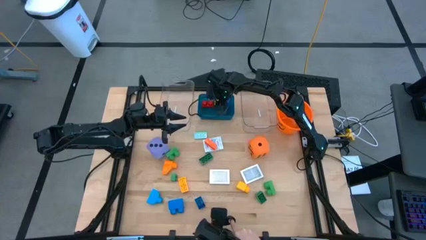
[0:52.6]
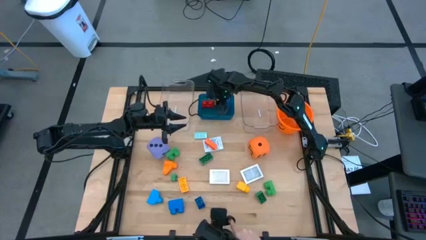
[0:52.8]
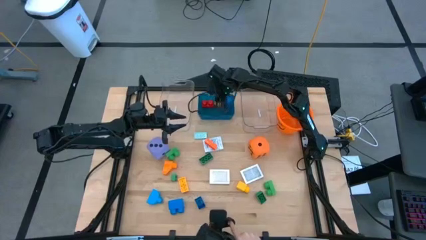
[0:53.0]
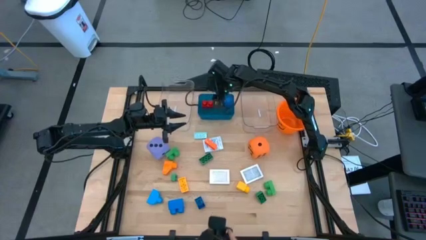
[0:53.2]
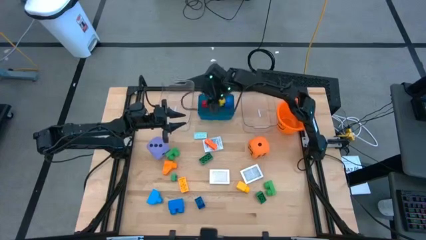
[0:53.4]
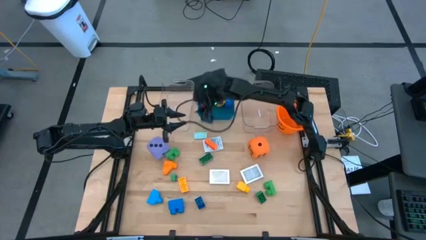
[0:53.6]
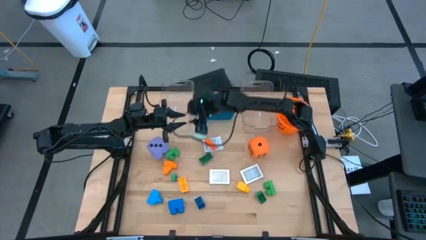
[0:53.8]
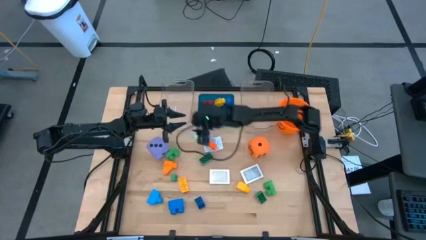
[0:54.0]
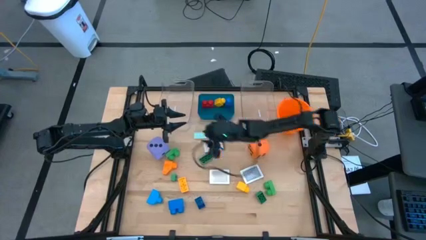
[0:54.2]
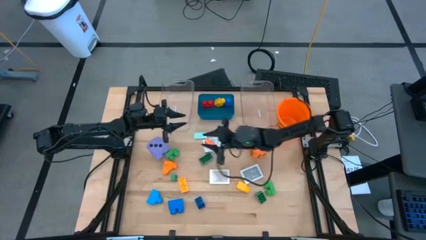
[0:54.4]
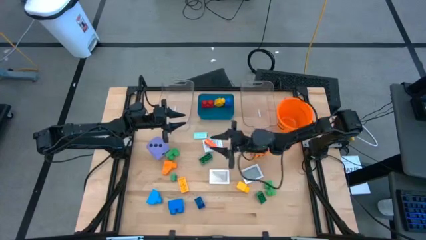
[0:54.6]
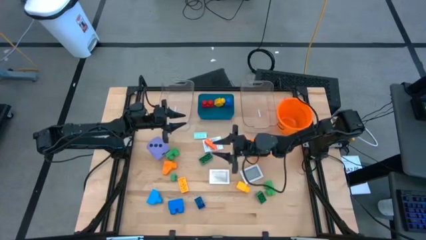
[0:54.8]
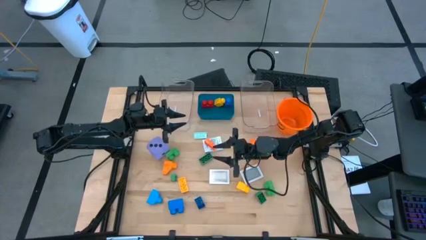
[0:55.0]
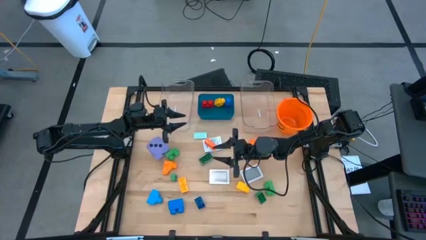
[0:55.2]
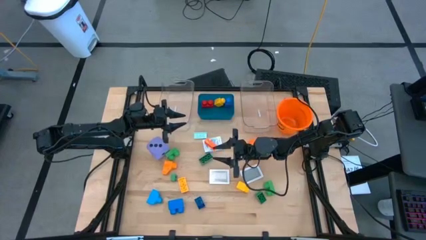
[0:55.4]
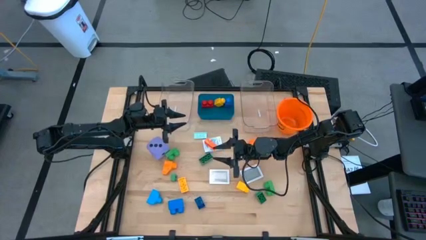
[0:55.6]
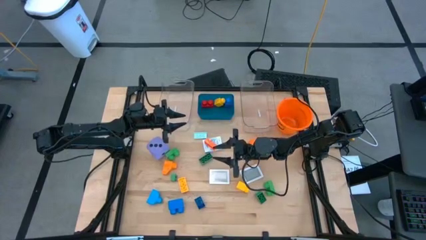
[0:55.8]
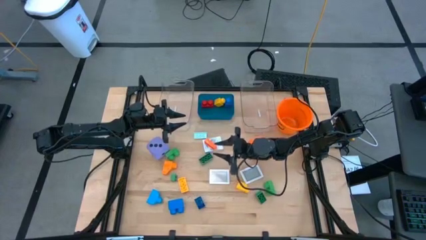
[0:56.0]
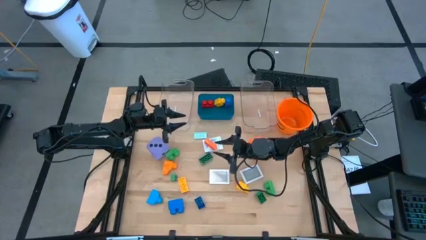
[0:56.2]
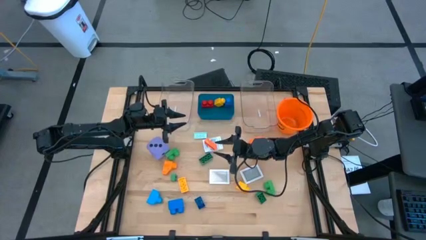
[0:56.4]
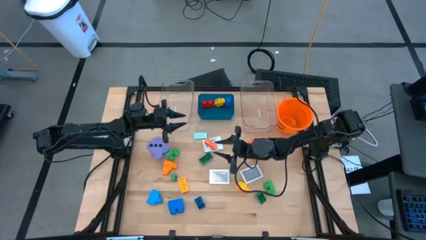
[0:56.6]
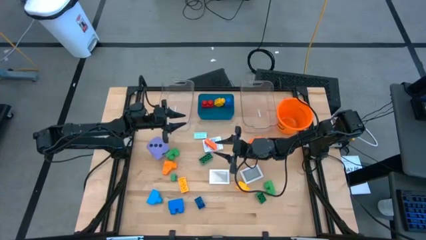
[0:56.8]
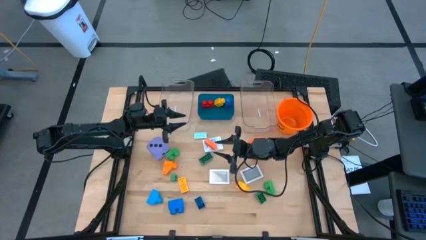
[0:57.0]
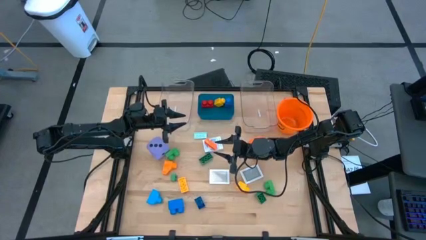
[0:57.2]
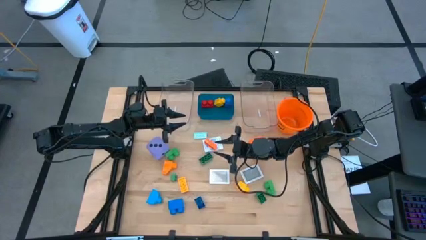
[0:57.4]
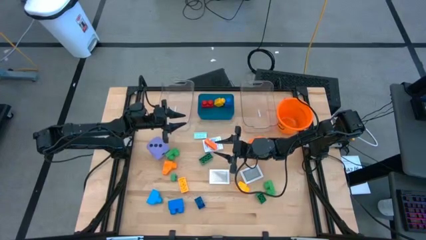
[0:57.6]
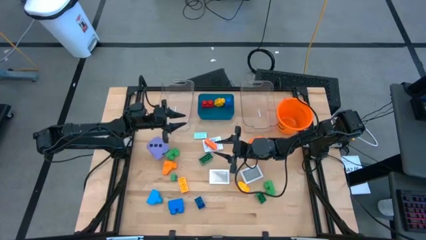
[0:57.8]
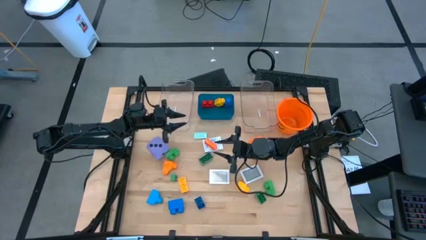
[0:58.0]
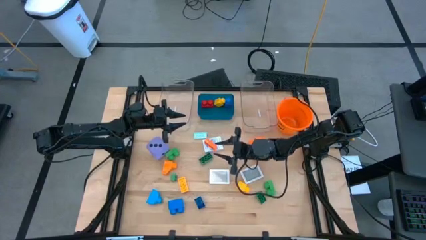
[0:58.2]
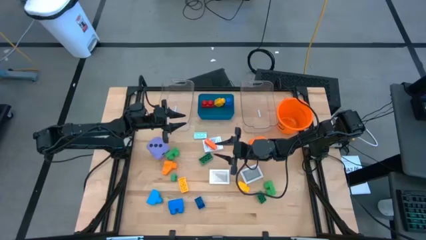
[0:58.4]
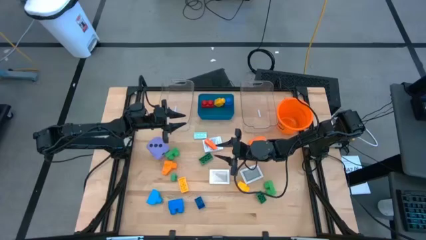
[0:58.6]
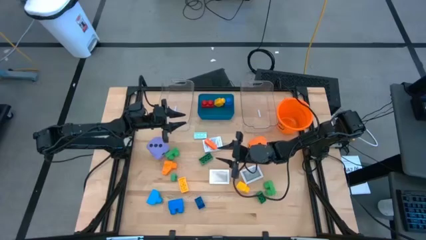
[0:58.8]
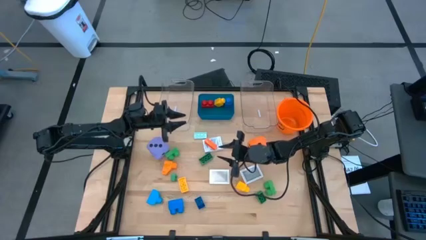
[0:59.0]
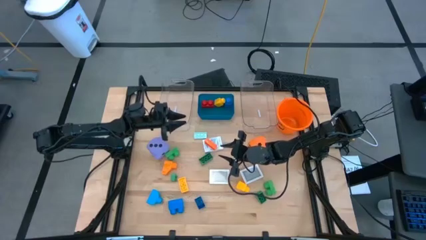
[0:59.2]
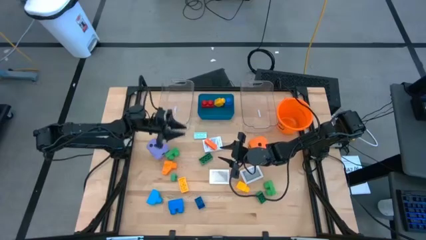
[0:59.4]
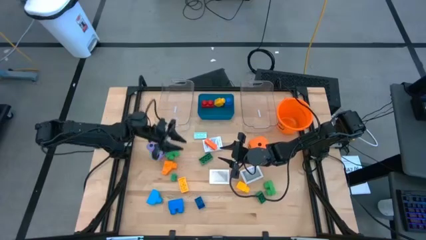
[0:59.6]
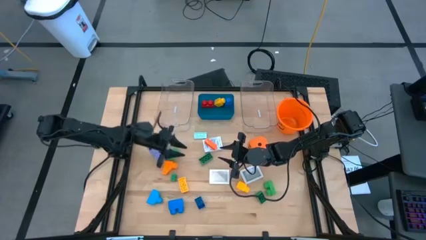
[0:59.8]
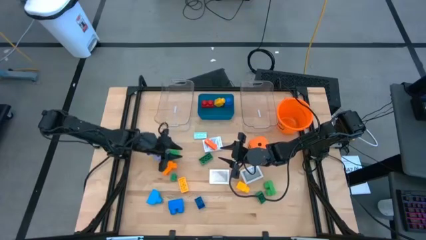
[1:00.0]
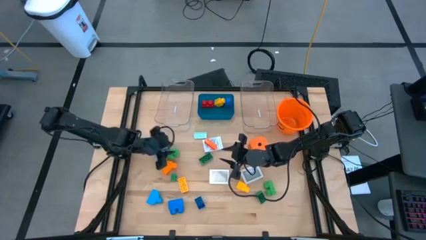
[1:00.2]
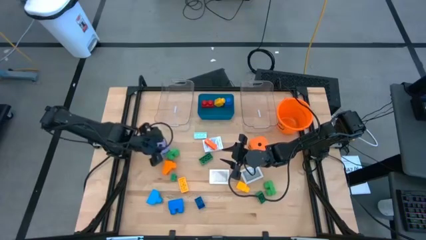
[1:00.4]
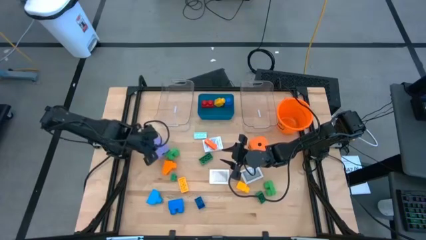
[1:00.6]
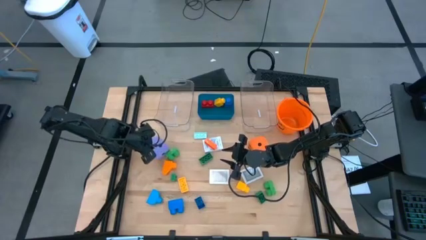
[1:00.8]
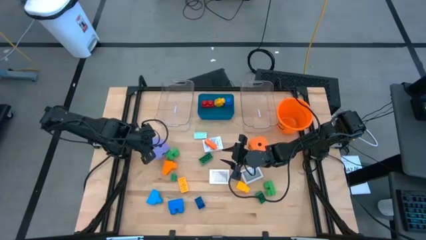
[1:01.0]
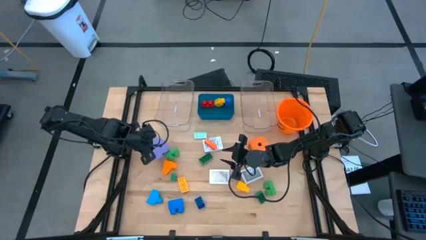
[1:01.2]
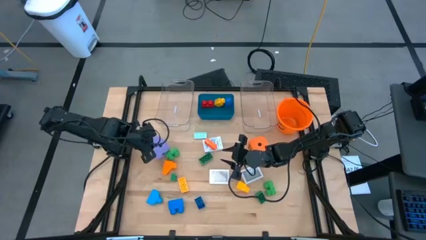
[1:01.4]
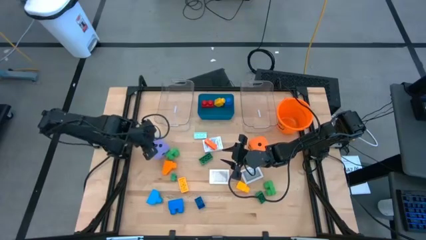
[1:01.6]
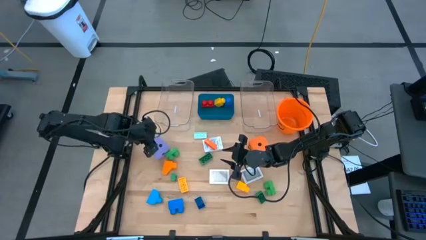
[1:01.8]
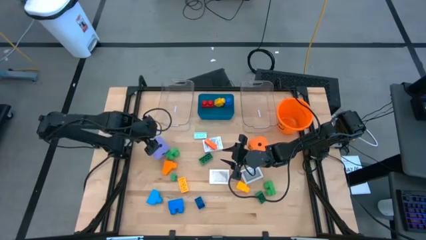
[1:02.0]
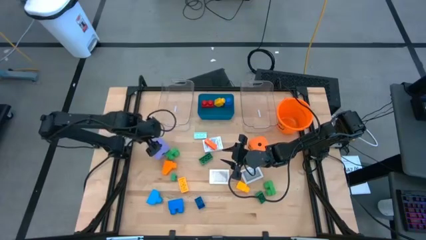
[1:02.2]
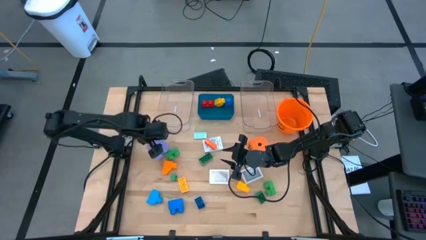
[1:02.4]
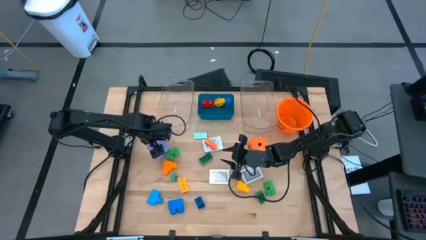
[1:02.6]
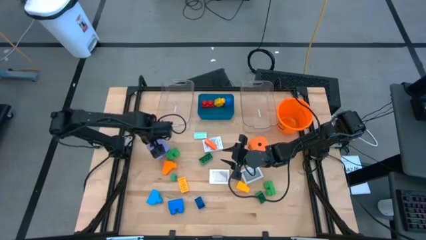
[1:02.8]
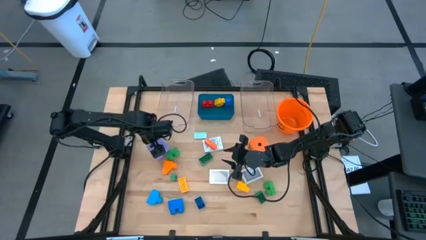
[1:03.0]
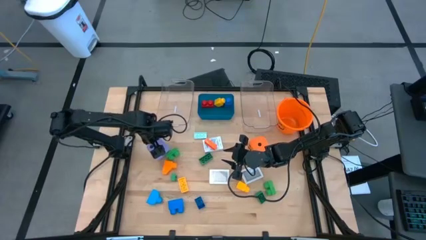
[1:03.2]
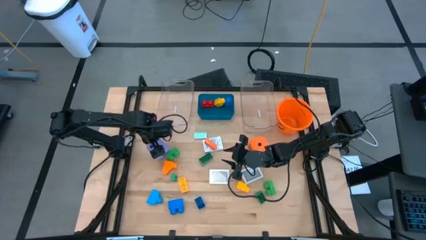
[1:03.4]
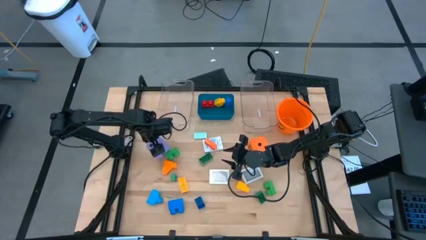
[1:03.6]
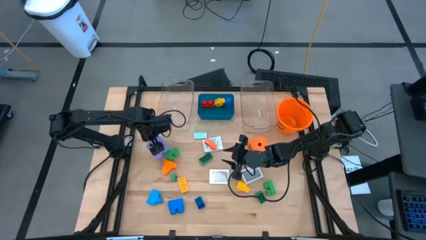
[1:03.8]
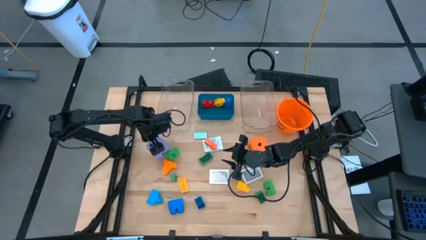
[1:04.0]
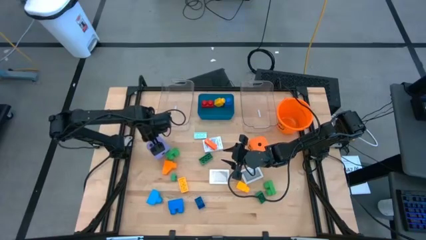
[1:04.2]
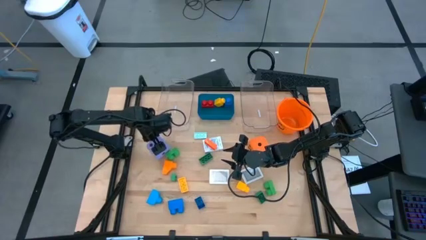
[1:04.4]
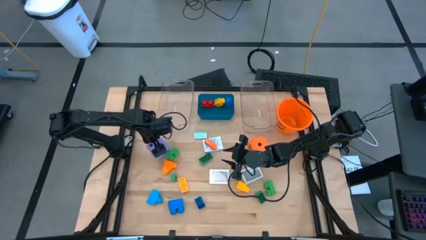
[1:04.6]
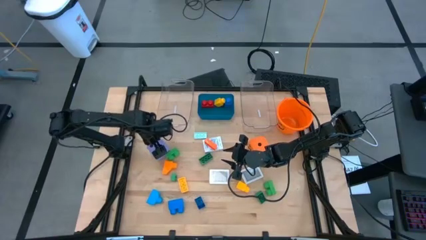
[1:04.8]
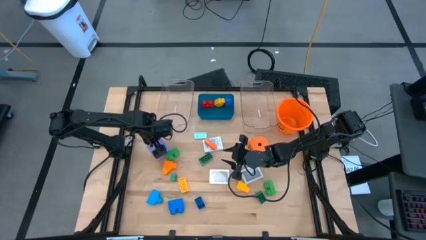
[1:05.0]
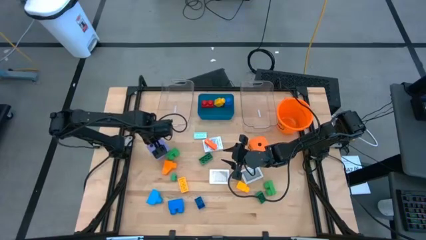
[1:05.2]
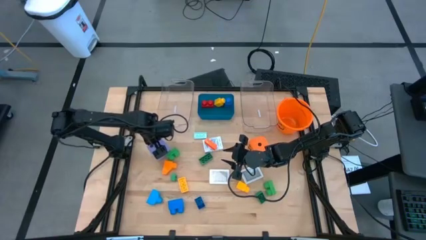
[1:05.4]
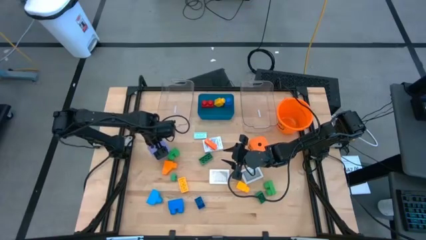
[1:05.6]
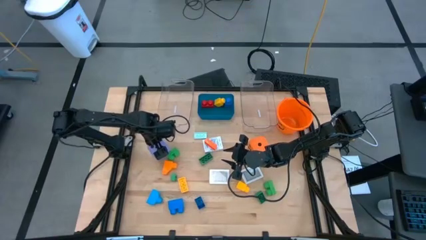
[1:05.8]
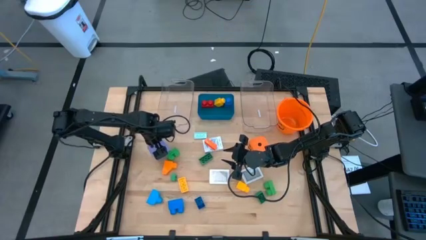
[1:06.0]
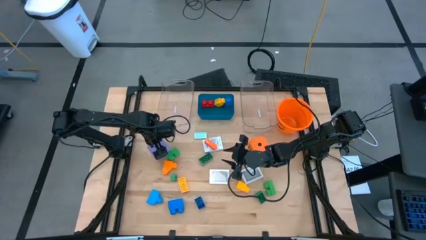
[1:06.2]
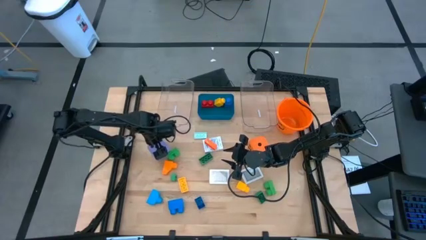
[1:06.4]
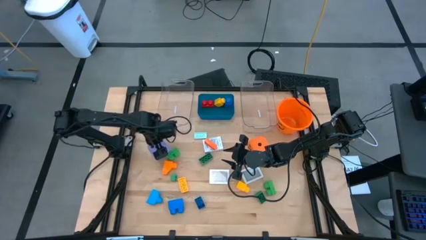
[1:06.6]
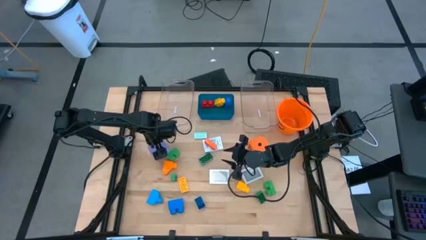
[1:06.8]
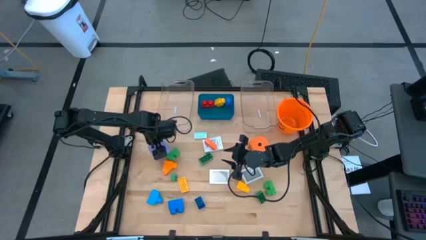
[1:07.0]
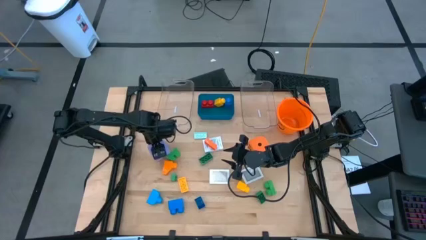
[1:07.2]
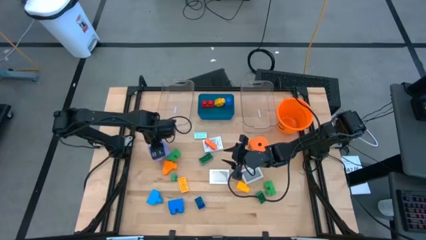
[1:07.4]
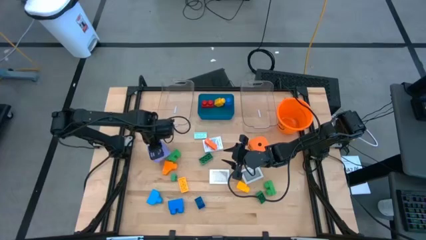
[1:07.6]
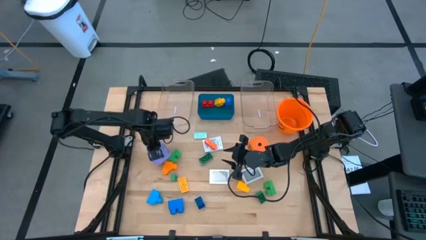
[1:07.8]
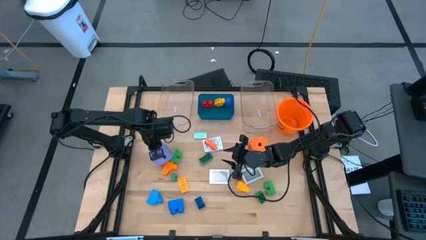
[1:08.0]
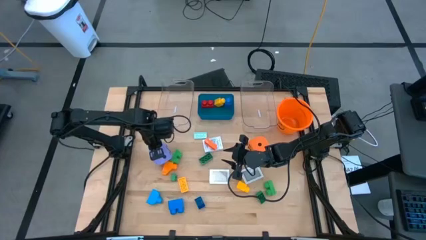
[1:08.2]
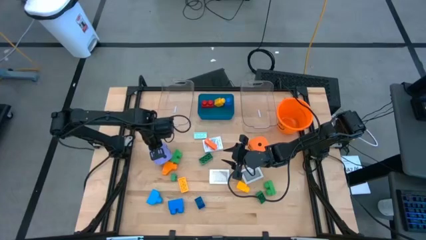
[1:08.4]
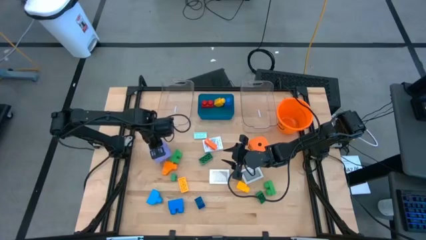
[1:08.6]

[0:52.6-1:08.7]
Task: Pick & Place Toys
Put the purple dice into the left transparent bin
